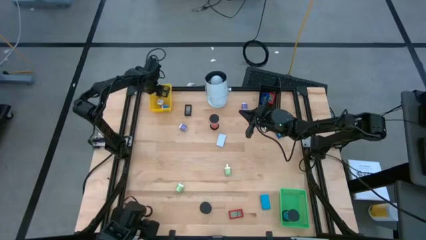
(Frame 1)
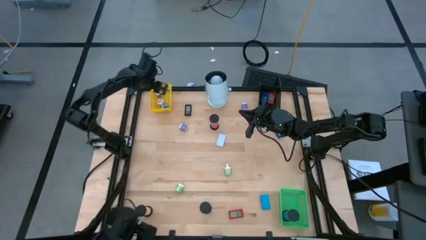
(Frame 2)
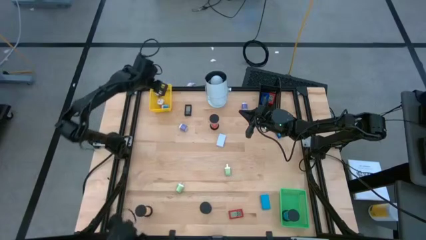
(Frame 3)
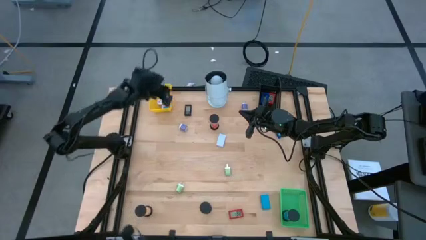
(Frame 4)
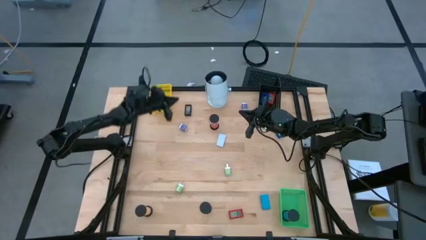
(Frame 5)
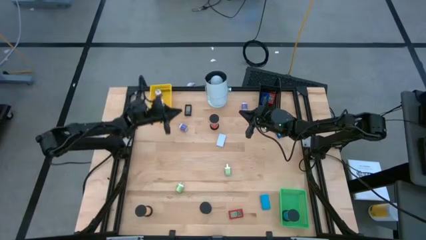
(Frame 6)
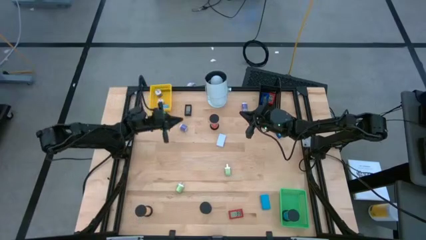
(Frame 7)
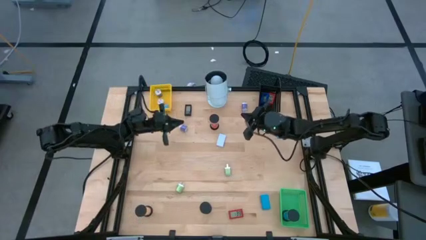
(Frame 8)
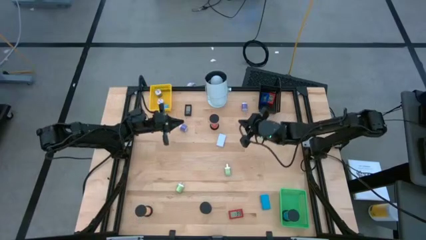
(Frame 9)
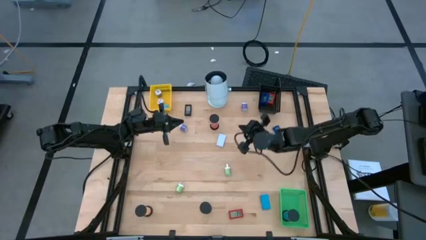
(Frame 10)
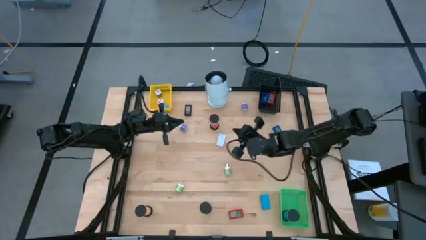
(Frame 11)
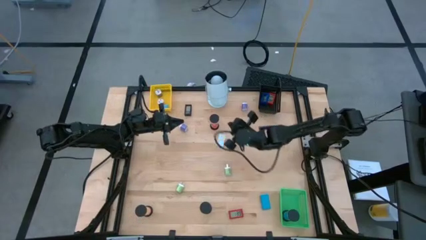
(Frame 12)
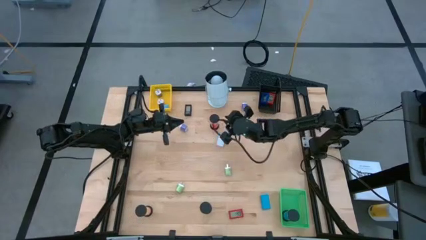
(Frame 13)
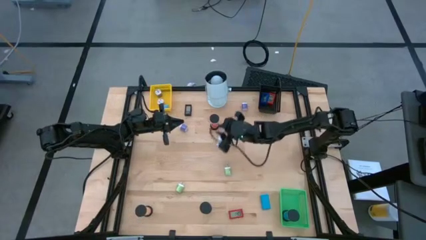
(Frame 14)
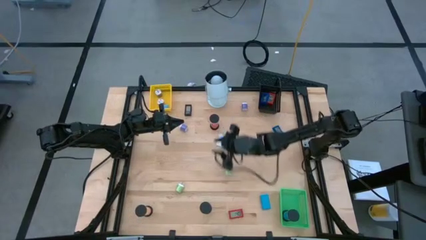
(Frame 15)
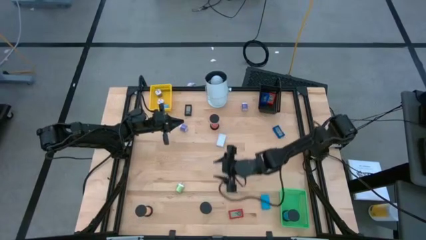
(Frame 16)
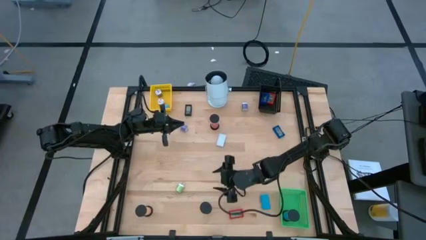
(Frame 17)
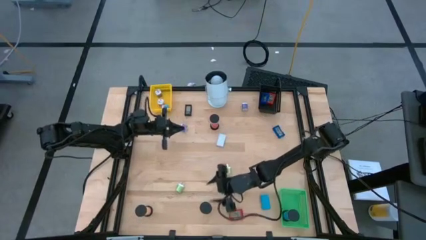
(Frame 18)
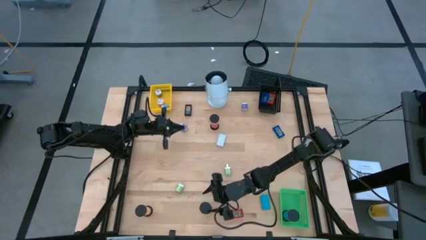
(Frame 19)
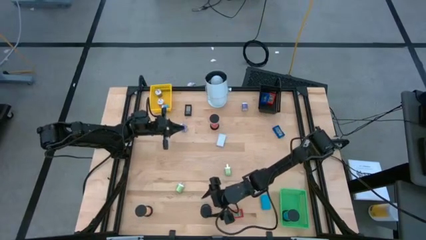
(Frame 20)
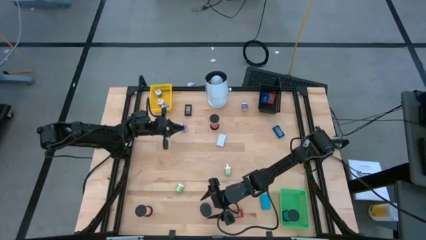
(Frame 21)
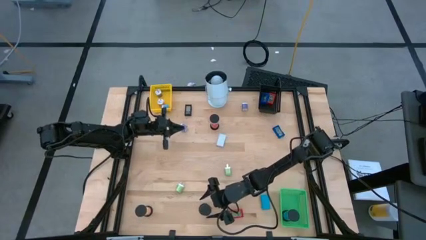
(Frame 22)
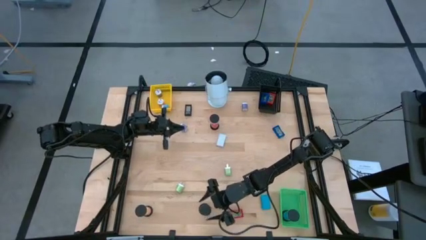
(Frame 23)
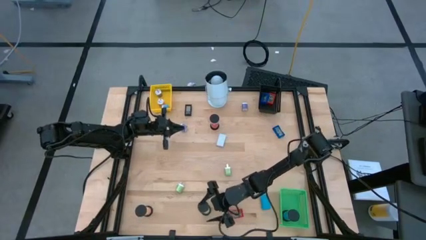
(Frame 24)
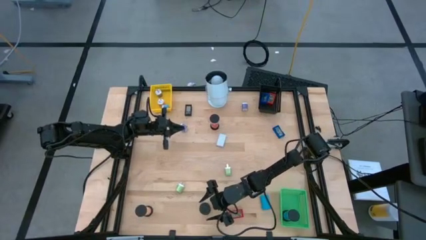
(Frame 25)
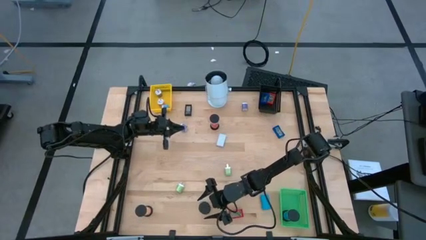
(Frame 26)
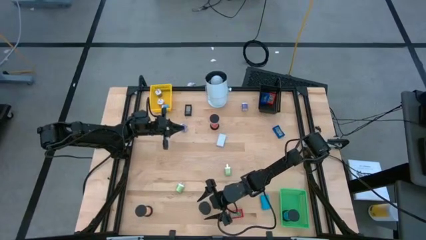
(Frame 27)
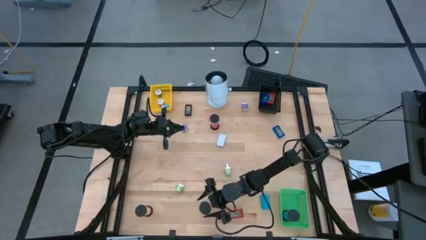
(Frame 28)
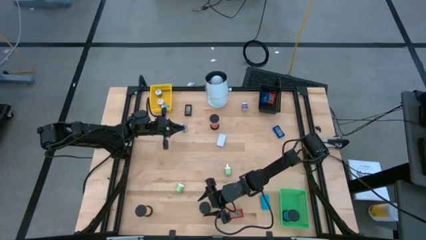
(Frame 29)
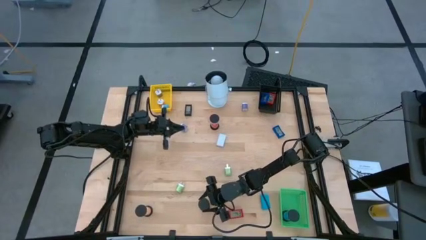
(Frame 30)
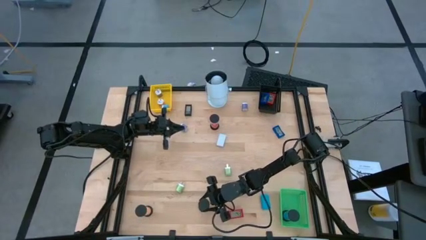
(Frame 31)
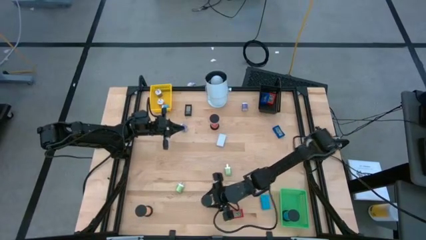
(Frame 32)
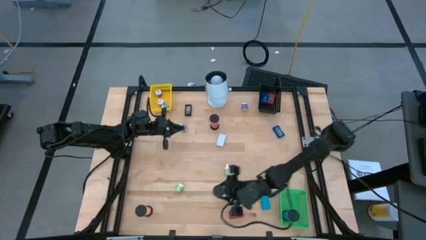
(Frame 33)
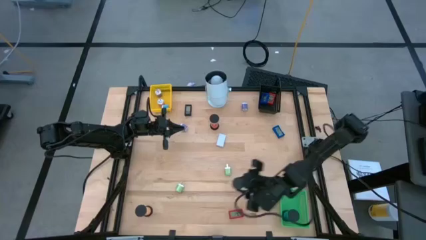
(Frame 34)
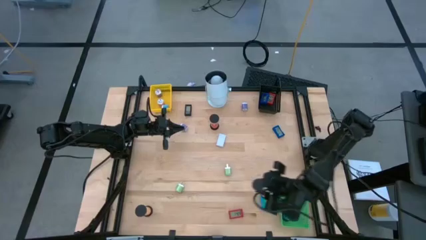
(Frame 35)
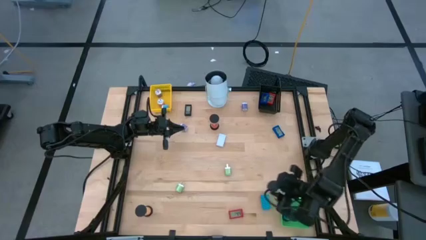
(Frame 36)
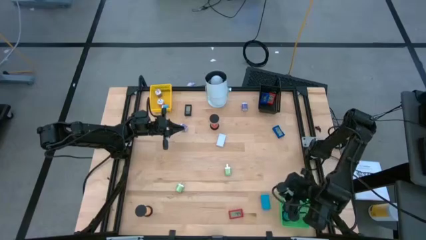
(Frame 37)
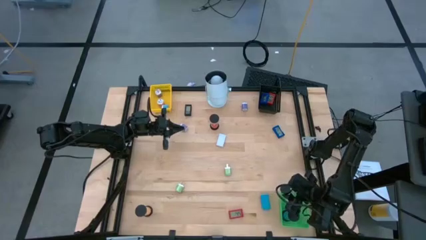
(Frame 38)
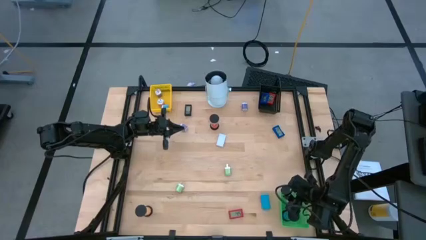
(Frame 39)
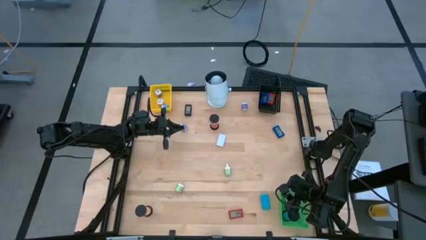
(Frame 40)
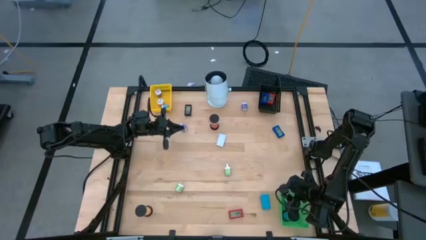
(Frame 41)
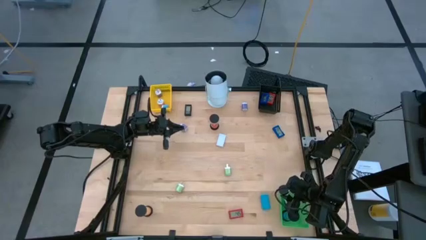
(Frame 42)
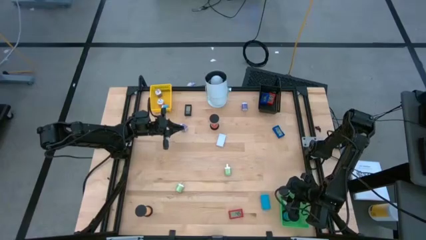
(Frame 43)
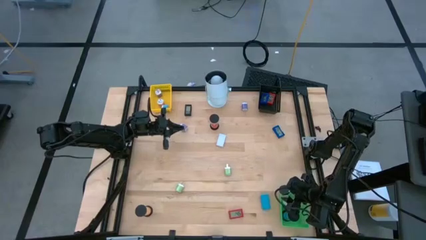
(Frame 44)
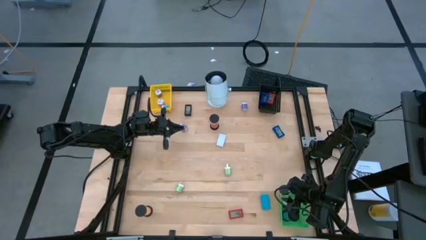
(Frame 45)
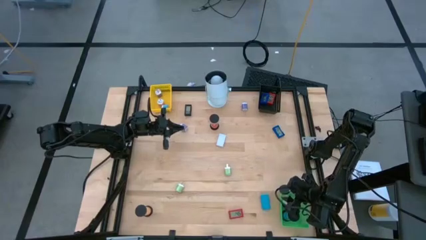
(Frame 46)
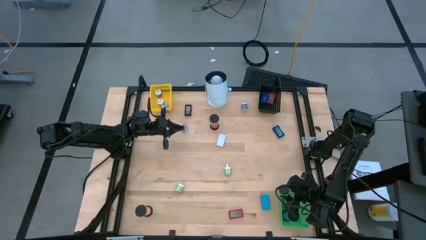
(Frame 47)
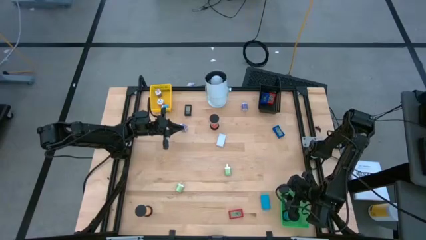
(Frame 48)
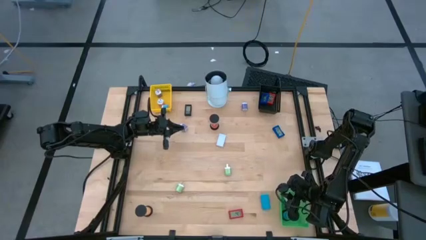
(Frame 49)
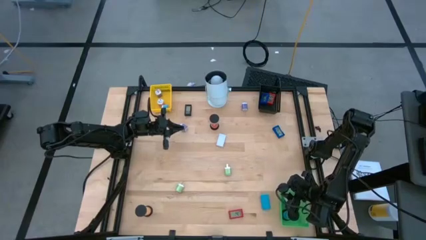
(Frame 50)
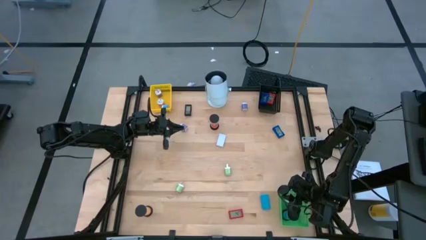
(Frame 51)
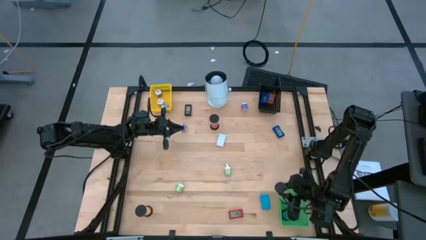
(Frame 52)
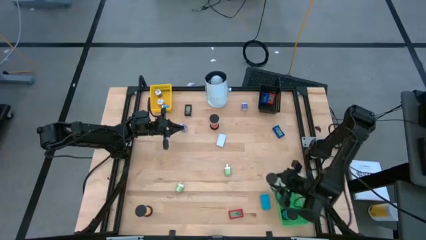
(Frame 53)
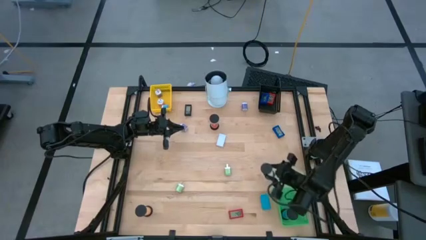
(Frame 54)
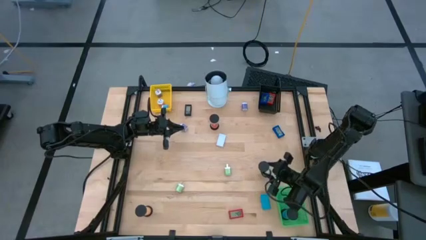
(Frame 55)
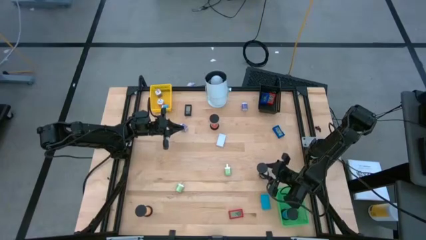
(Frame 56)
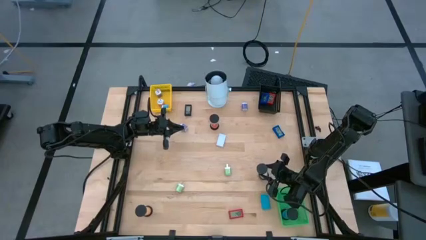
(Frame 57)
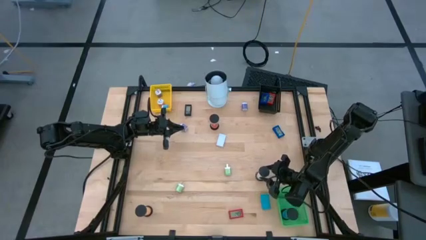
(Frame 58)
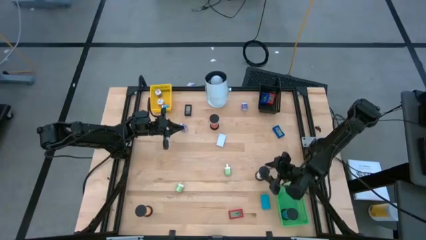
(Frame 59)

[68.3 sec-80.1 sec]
Task: Pick & Place Office items
Put the white hourglass into the green bin

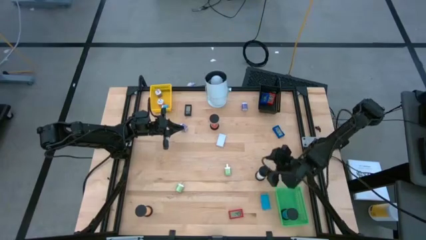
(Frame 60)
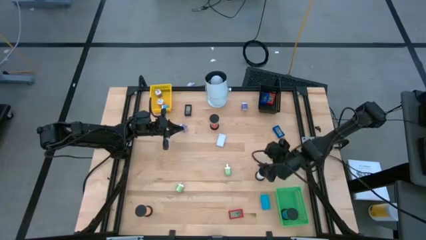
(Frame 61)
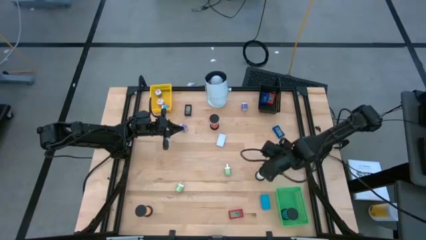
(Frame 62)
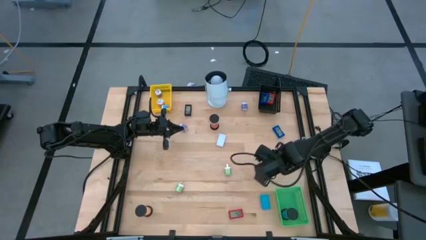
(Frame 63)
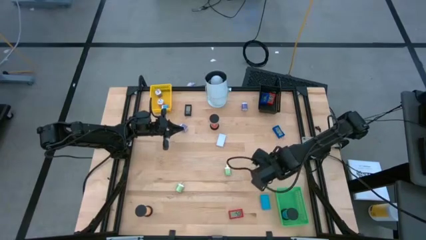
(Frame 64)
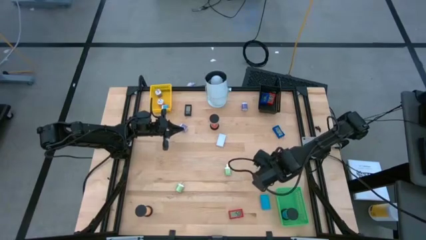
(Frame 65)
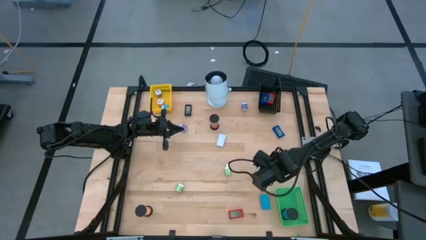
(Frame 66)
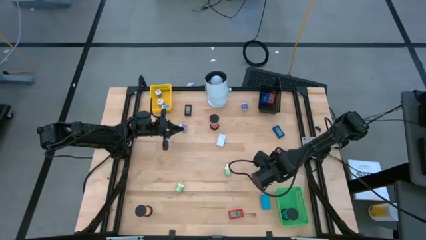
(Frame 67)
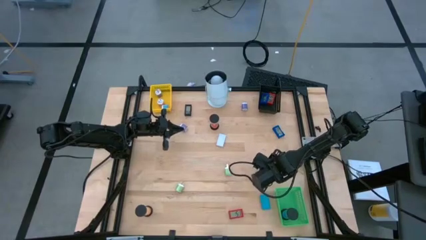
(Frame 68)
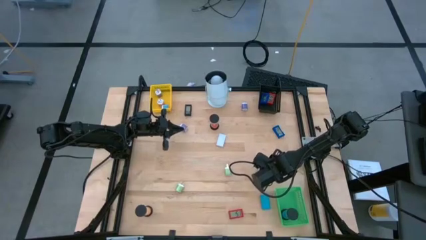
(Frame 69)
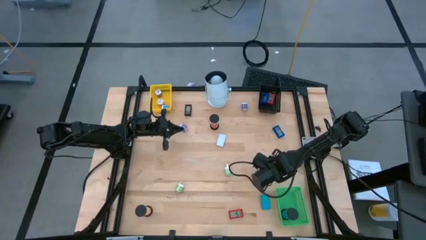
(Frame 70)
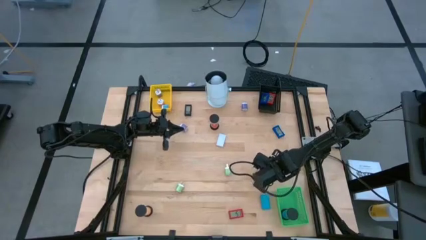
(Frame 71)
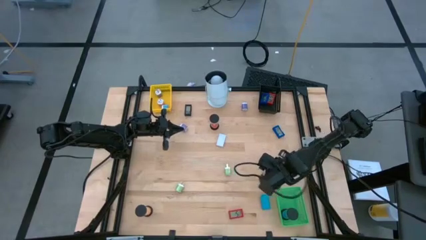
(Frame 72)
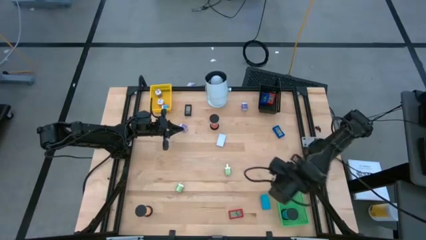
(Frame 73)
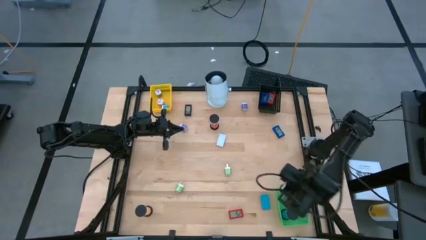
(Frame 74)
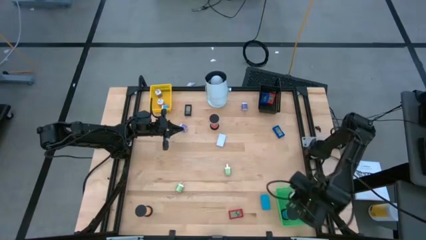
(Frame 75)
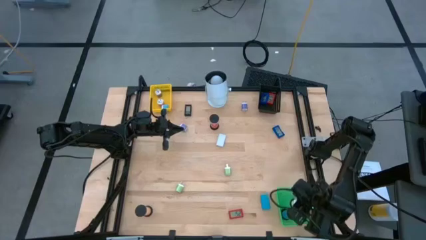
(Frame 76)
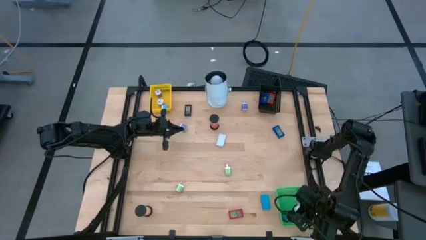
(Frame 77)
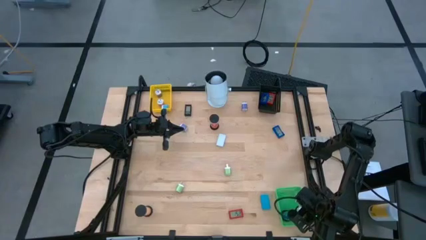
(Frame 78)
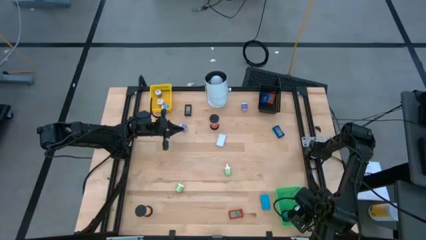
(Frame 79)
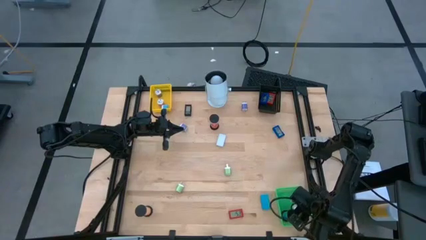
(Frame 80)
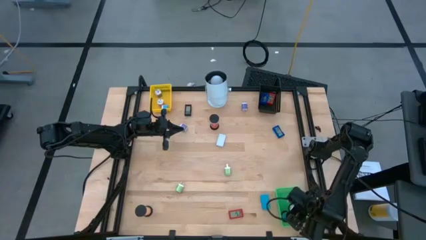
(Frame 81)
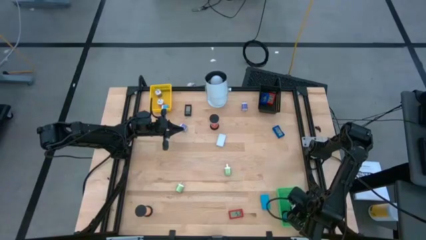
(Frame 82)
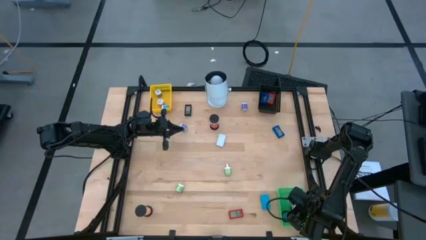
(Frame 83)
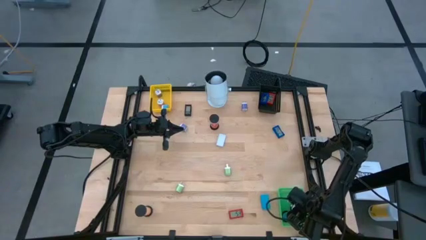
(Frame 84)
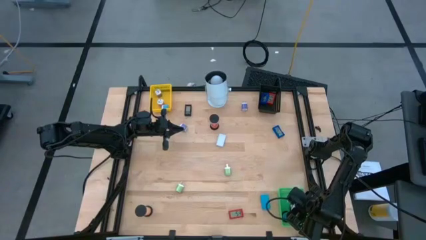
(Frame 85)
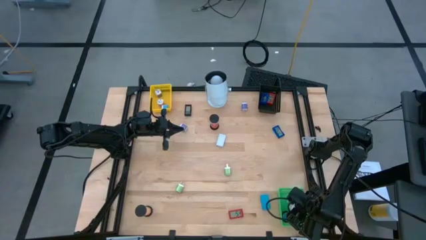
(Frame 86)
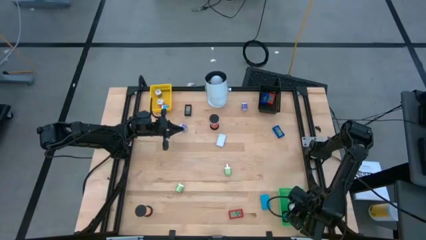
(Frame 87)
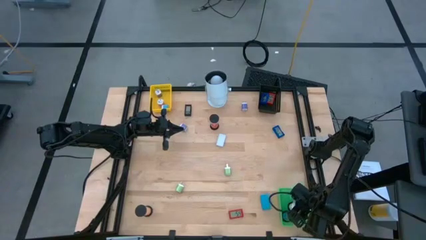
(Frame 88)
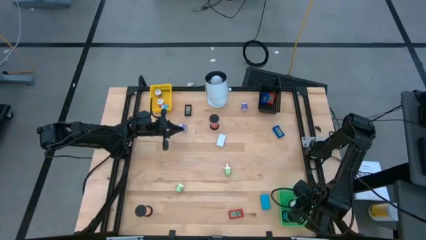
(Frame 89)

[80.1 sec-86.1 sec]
Put the white hourglass into the green bin
